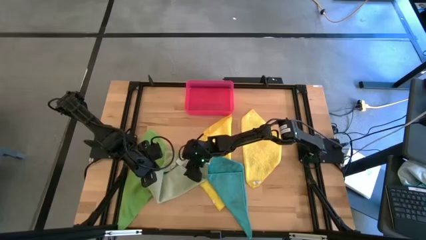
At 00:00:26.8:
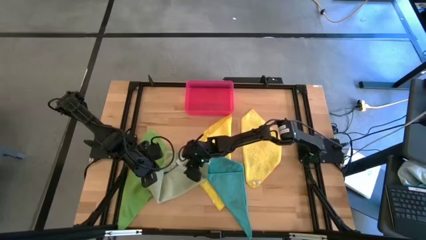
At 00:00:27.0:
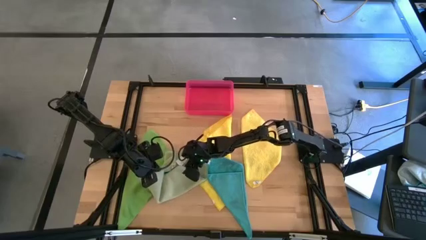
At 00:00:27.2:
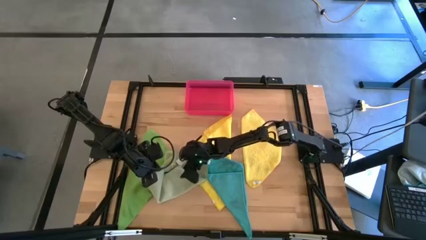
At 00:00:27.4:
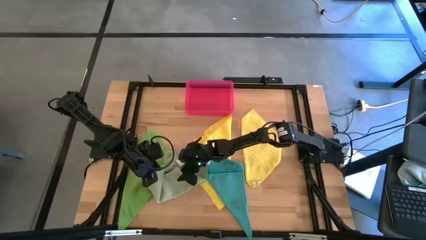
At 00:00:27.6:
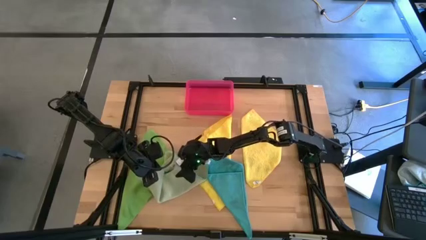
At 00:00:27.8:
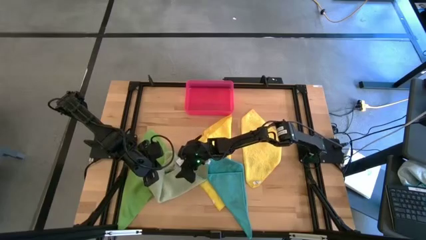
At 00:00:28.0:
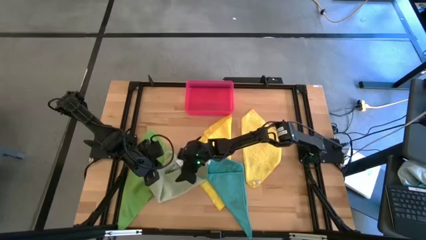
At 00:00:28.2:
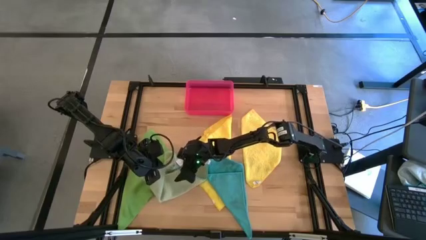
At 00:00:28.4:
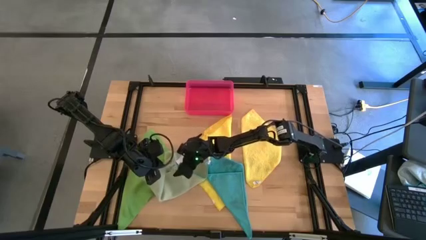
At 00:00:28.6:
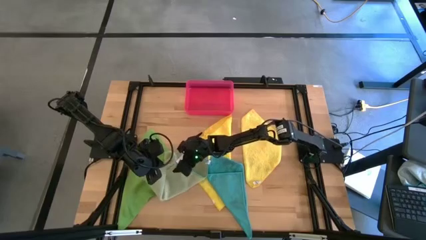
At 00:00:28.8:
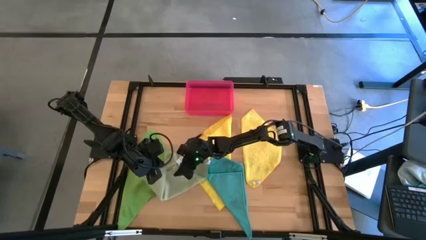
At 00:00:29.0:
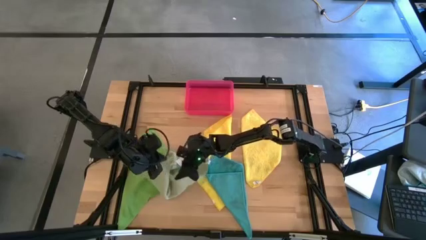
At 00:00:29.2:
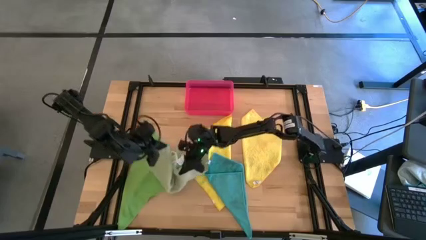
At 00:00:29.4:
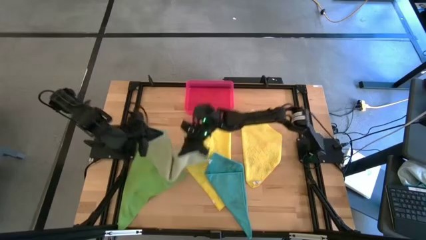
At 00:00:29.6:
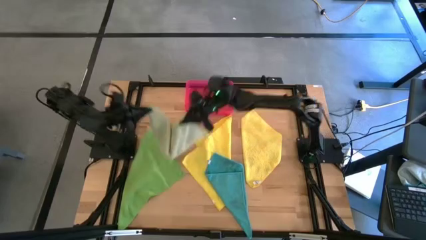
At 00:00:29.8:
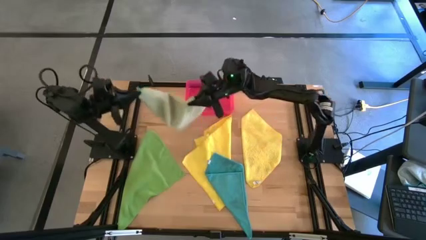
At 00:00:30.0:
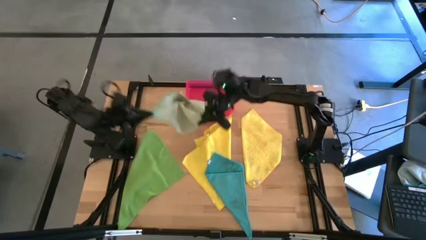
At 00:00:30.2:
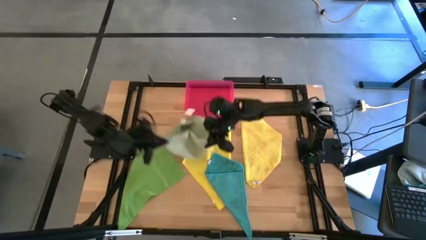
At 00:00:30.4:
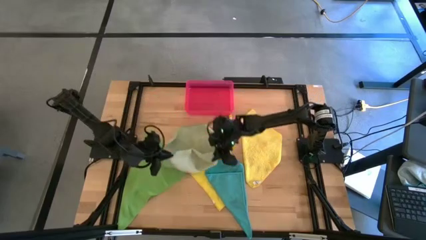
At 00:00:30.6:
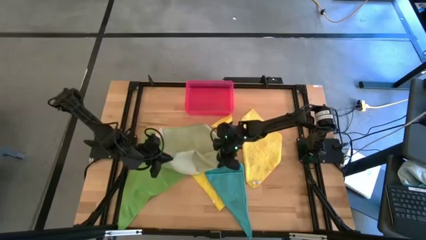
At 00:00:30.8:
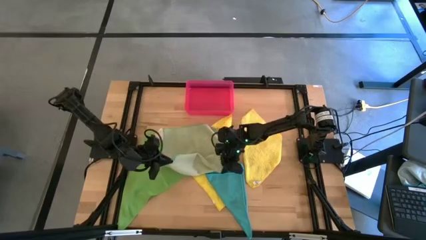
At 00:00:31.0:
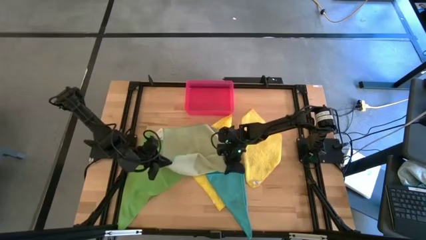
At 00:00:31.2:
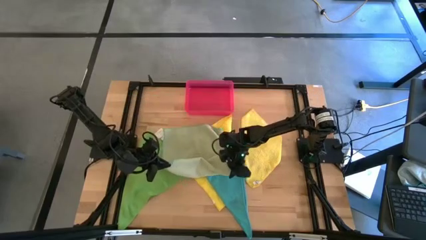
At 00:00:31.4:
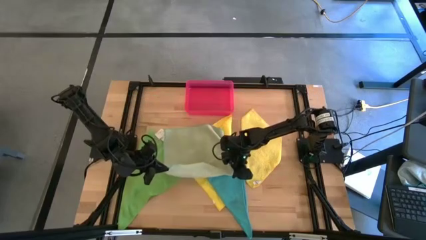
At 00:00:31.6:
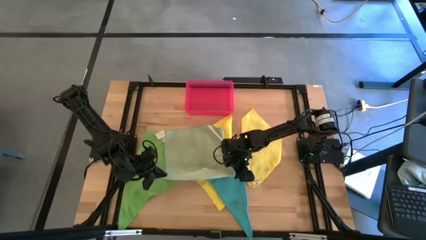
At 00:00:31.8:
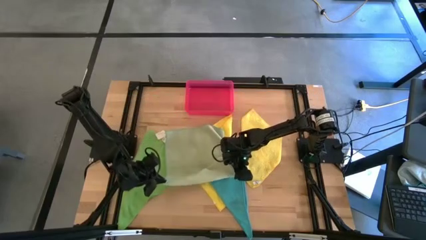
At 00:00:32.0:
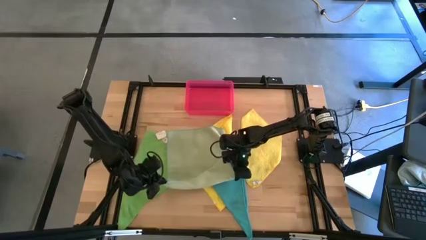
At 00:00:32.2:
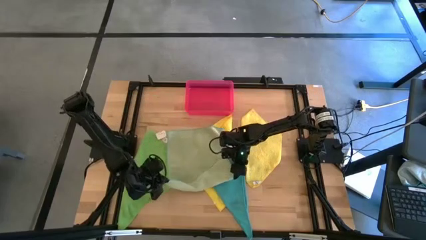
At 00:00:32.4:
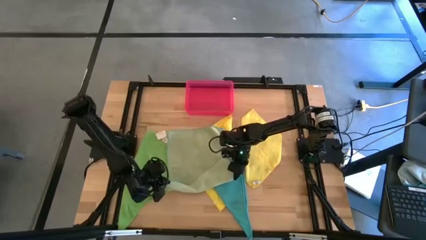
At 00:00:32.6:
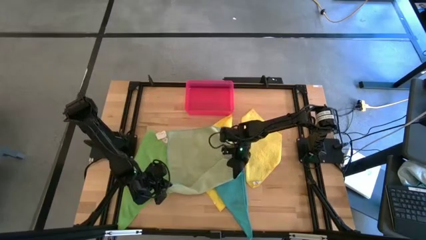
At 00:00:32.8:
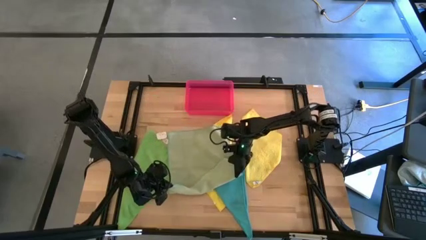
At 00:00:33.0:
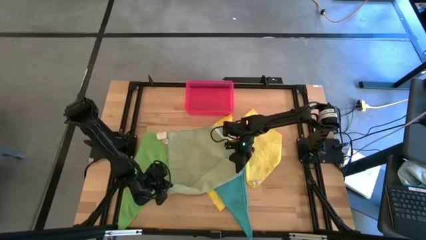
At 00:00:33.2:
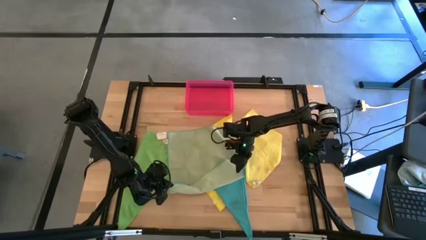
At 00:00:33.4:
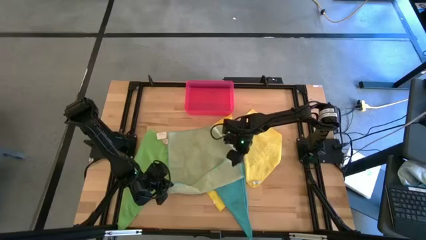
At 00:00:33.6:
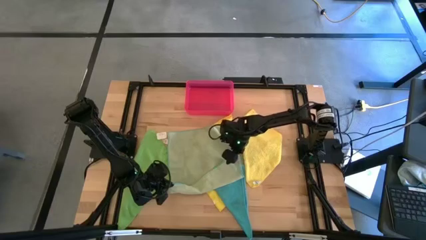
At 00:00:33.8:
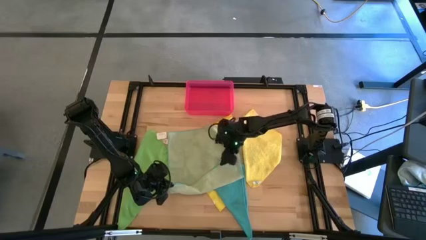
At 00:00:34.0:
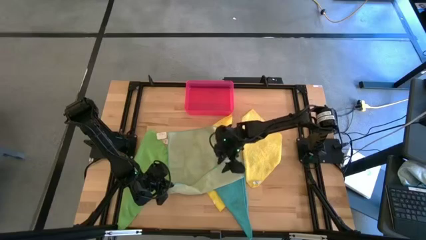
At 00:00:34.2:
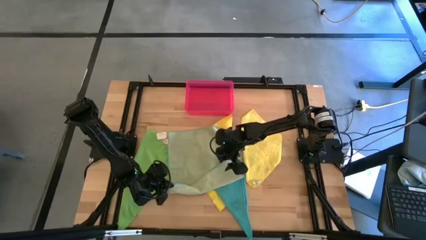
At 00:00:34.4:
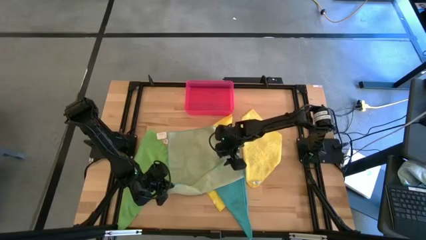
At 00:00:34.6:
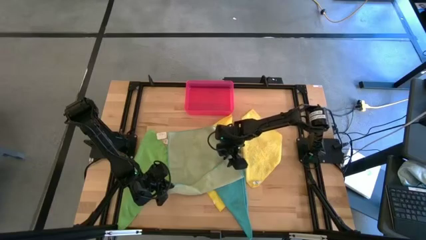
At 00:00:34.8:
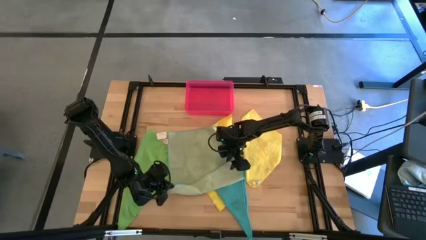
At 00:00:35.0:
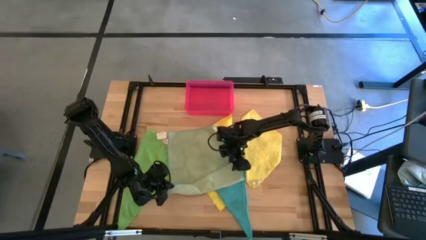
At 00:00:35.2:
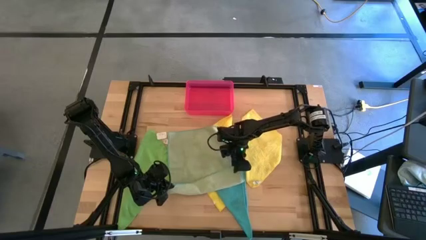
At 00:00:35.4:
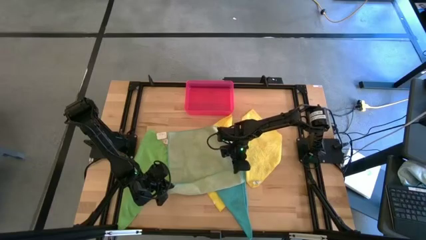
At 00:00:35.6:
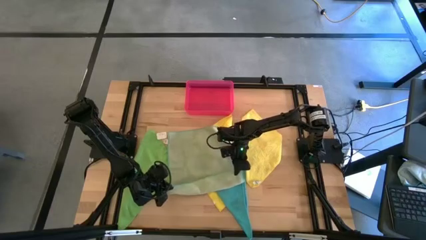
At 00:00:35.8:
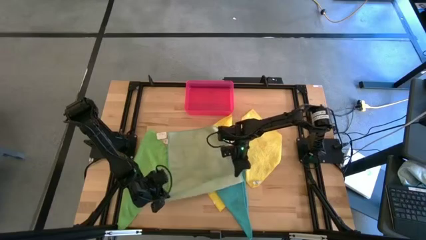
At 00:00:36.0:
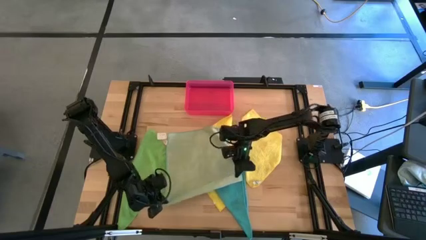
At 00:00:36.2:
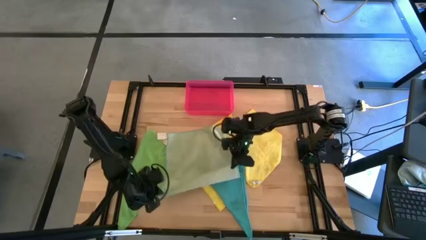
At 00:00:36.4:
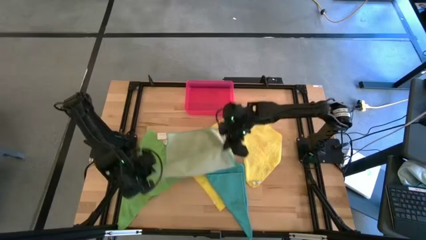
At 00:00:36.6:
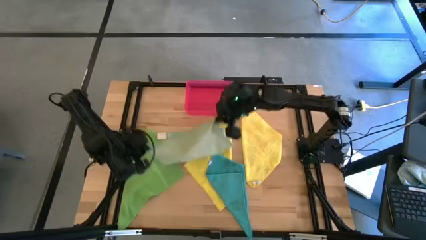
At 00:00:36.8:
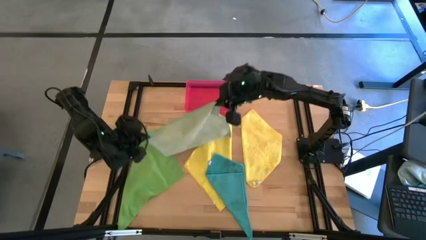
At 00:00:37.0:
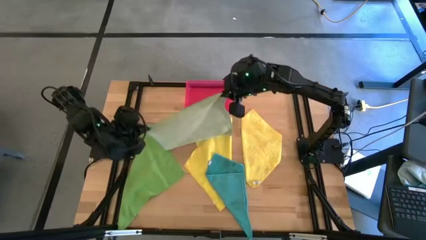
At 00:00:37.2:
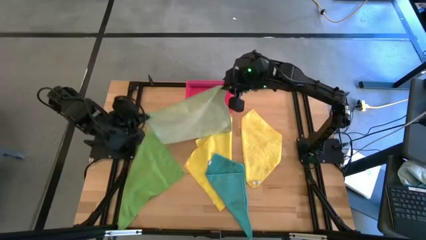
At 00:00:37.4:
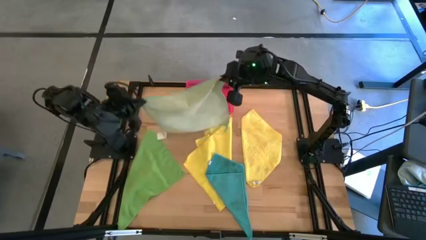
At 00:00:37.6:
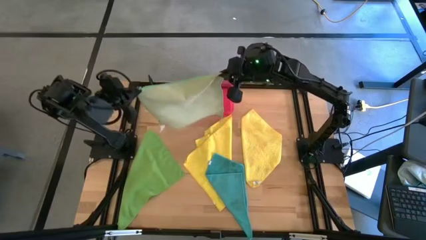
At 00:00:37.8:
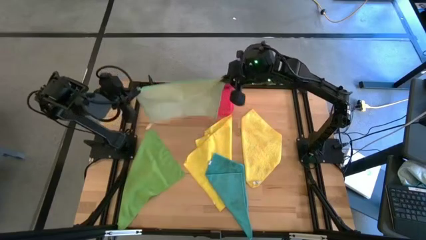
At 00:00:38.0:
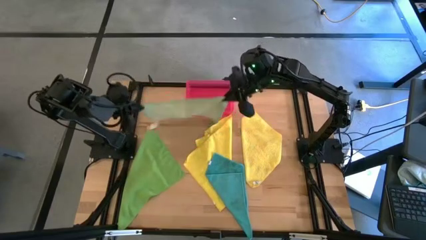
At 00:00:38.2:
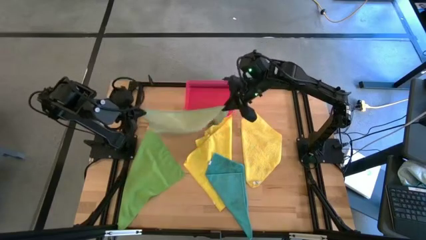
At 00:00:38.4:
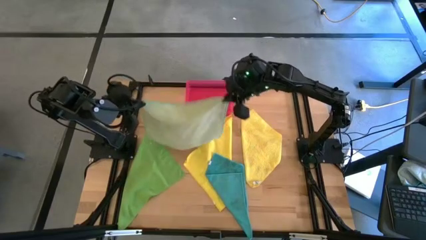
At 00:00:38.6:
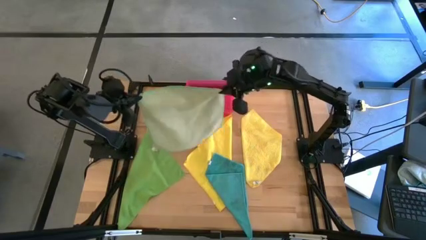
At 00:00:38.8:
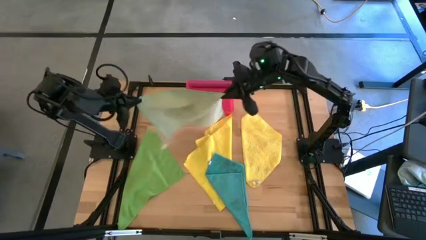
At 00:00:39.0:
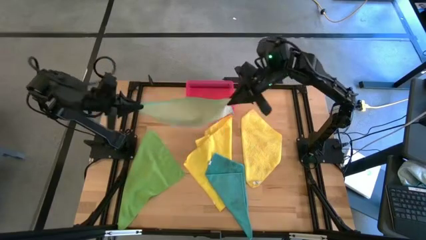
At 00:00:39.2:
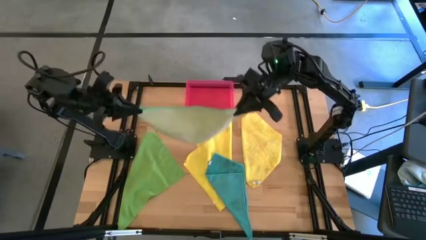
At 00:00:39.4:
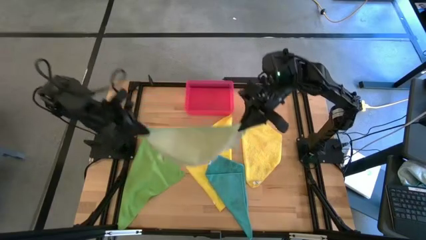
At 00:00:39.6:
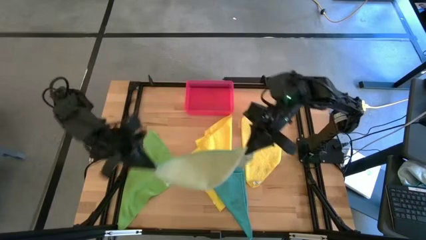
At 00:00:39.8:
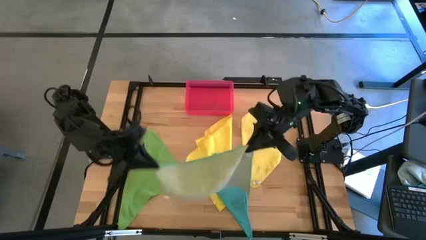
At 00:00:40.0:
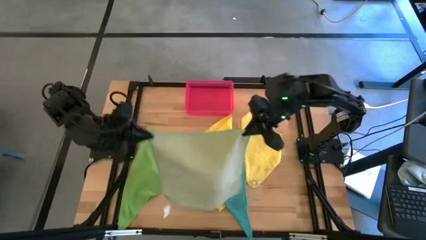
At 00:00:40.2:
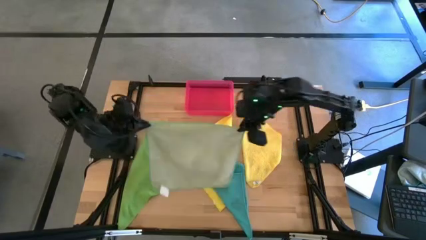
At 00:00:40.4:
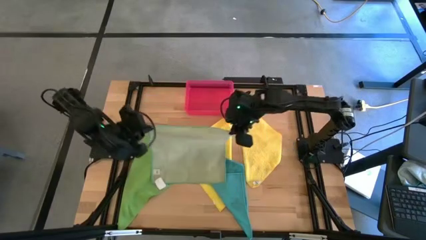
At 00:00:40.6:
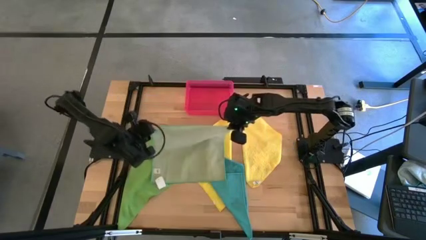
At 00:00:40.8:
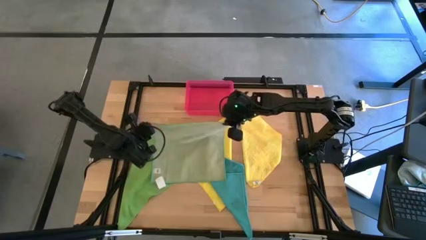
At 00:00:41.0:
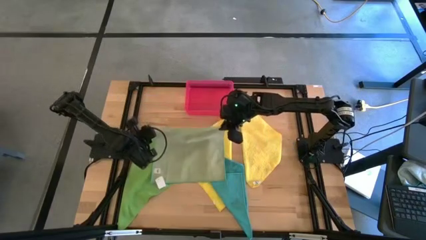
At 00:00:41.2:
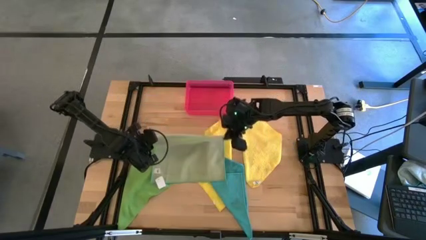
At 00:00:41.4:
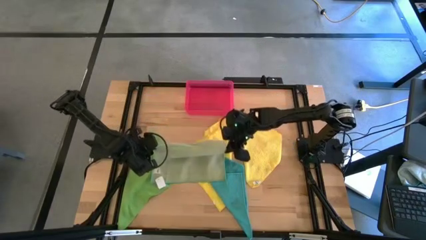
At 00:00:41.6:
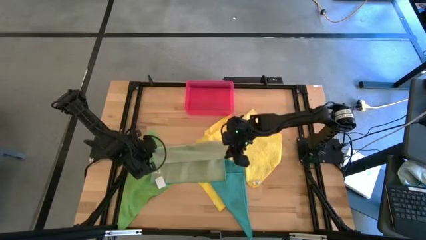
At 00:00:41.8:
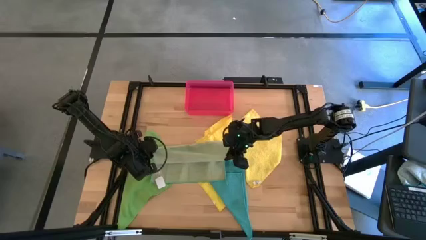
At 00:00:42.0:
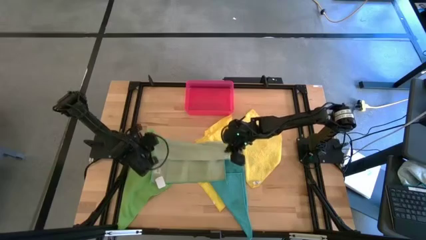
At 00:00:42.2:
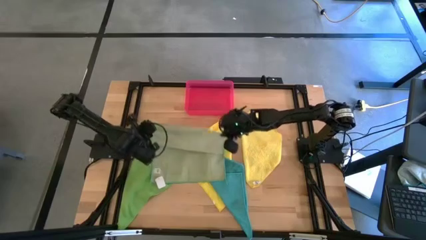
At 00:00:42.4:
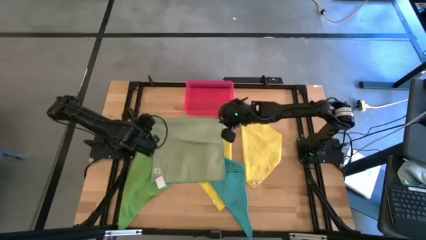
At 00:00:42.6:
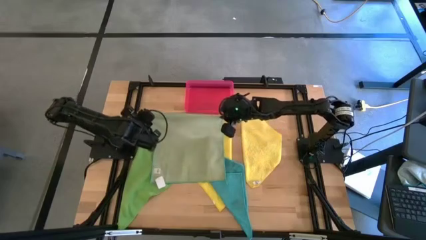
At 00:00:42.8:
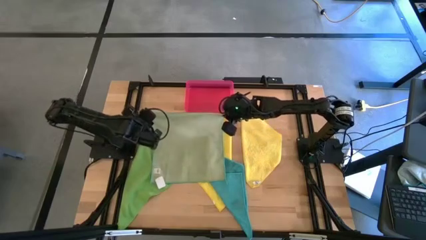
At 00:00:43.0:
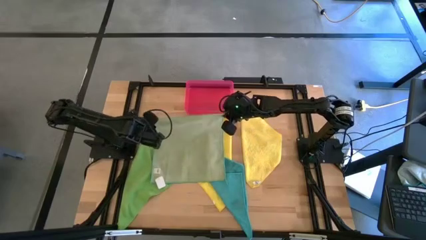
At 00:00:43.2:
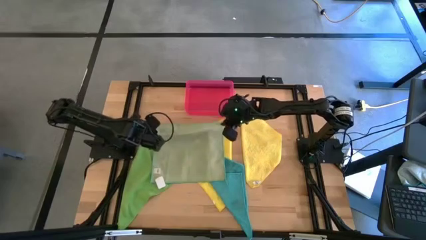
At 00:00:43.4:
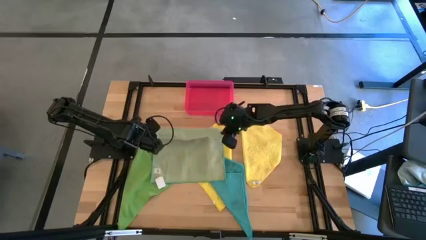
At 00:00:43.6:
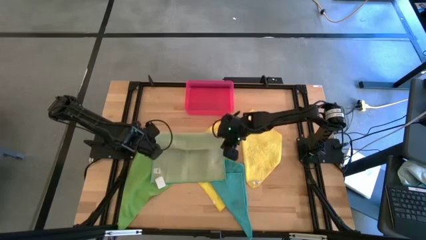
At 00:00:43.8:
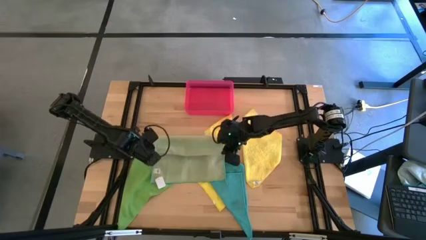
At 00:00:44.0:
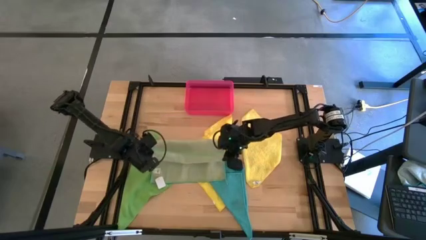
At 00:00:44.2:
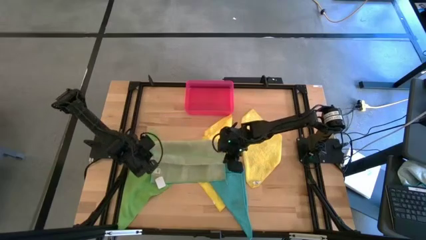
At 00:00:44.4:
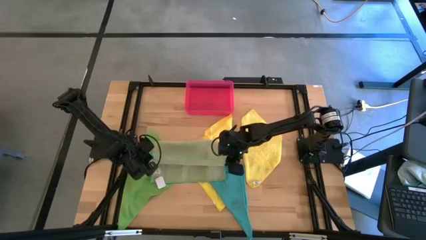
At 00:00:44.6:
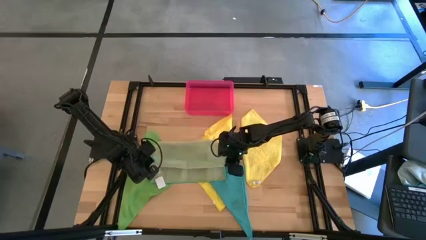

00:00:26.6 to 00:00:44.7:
Task: Fold microfiber towels
Fold the light green microfiber cloth
